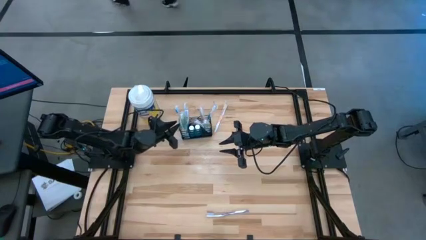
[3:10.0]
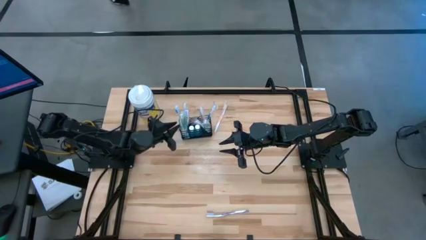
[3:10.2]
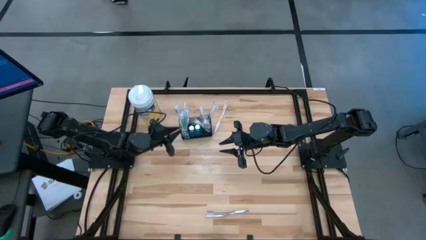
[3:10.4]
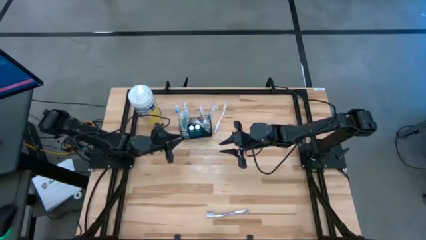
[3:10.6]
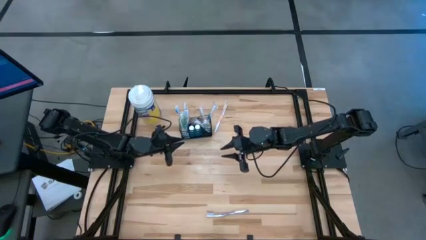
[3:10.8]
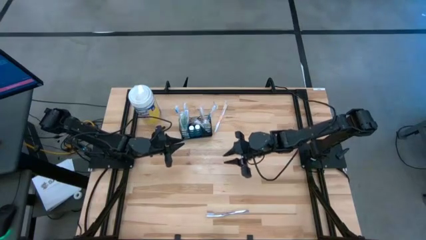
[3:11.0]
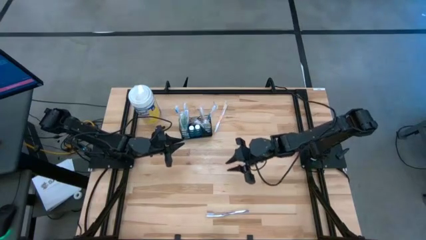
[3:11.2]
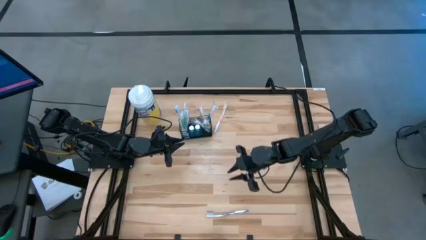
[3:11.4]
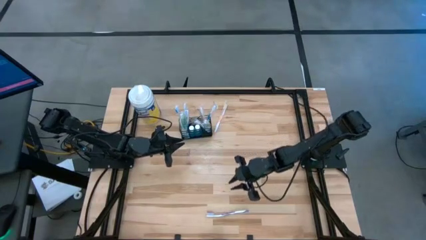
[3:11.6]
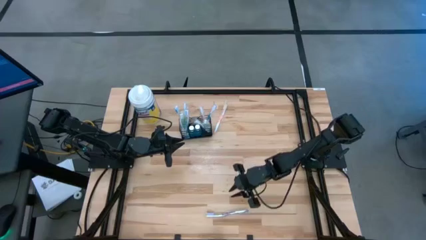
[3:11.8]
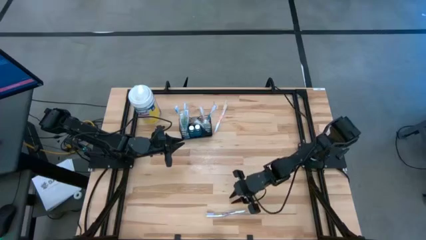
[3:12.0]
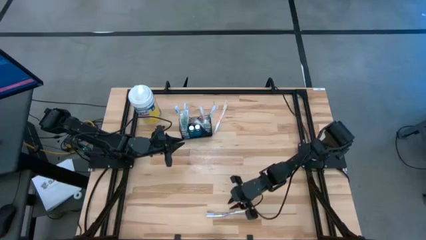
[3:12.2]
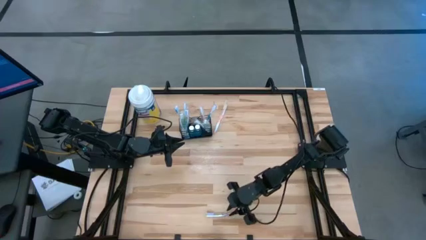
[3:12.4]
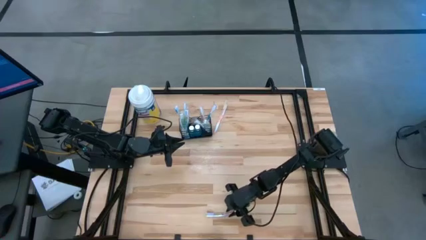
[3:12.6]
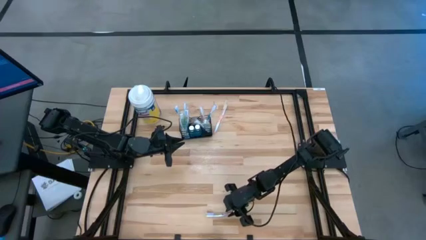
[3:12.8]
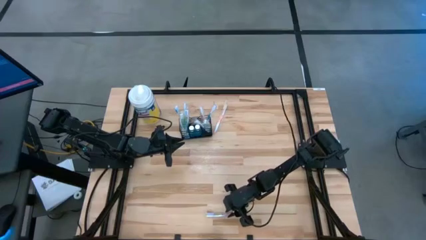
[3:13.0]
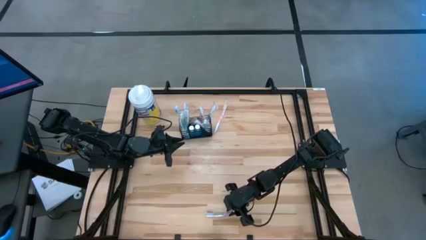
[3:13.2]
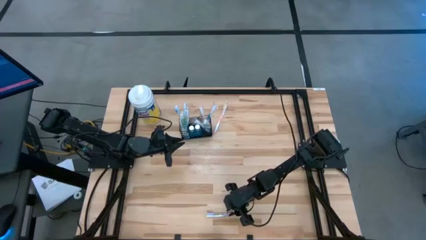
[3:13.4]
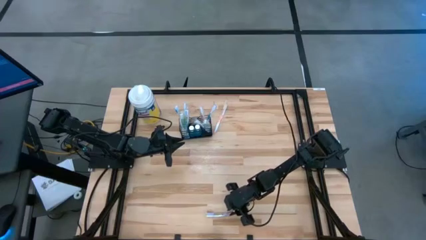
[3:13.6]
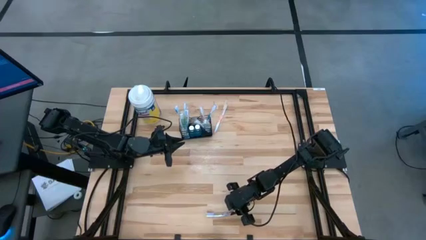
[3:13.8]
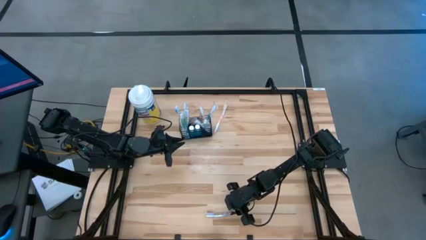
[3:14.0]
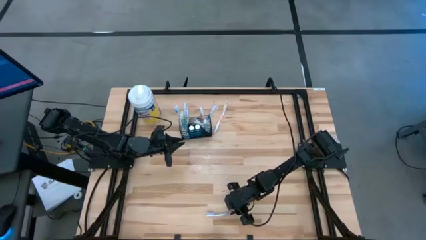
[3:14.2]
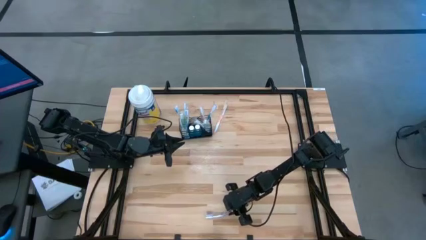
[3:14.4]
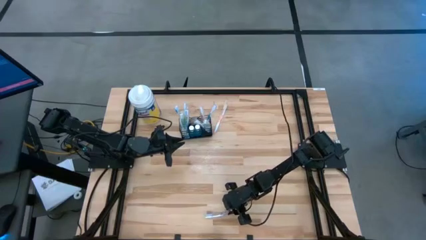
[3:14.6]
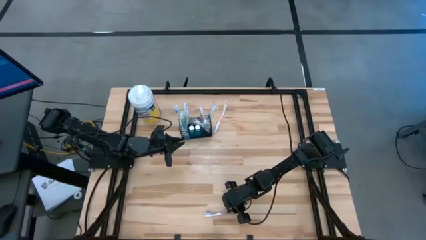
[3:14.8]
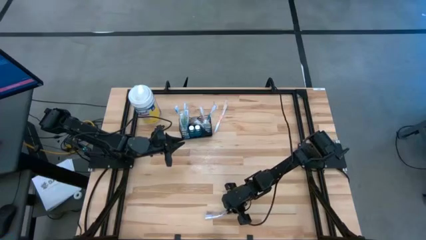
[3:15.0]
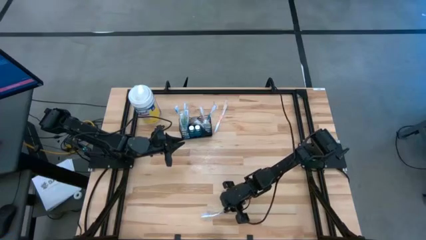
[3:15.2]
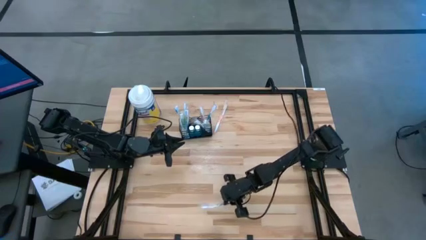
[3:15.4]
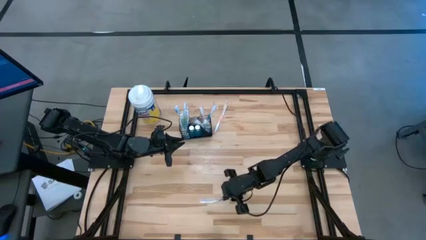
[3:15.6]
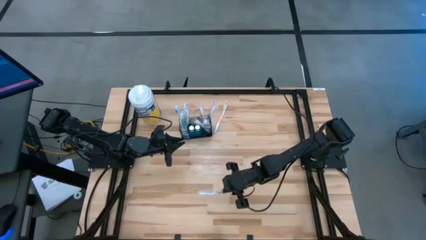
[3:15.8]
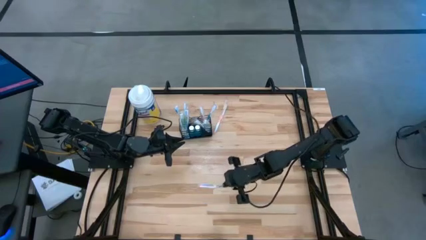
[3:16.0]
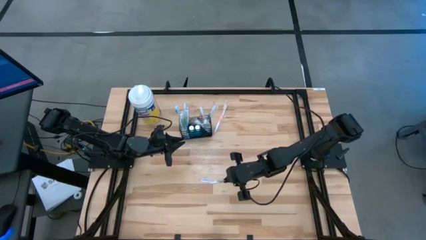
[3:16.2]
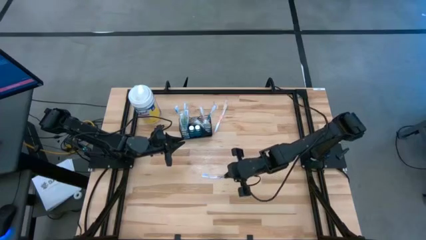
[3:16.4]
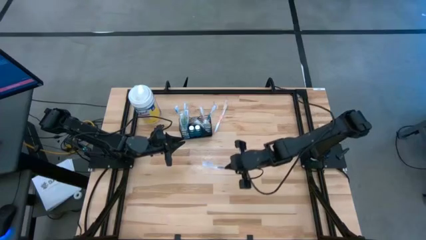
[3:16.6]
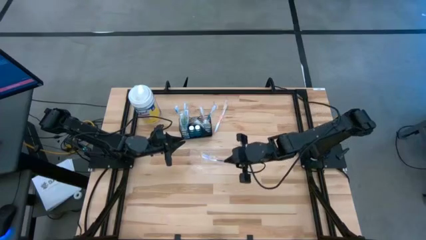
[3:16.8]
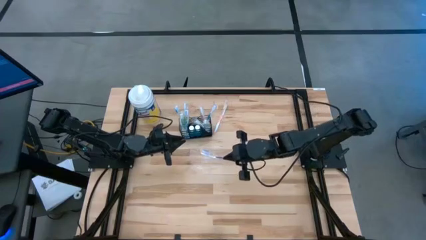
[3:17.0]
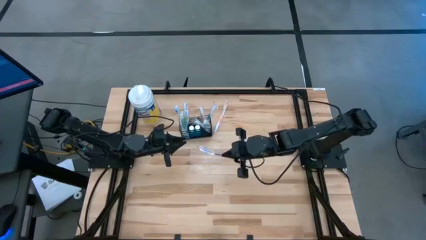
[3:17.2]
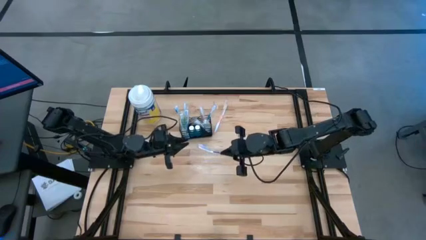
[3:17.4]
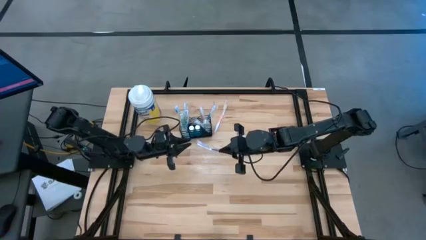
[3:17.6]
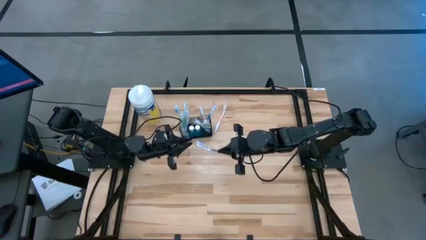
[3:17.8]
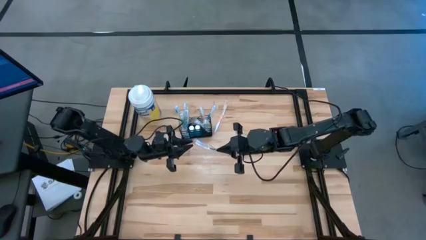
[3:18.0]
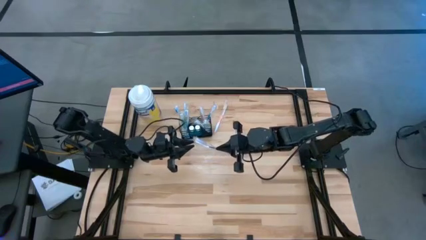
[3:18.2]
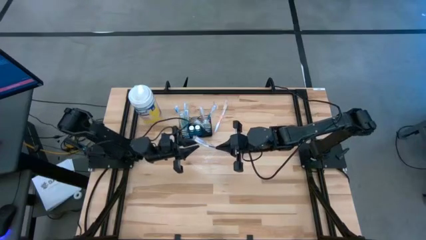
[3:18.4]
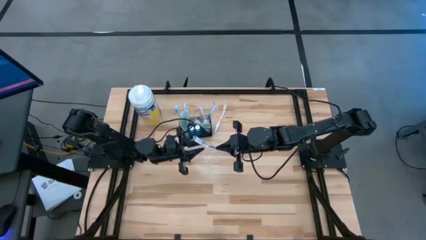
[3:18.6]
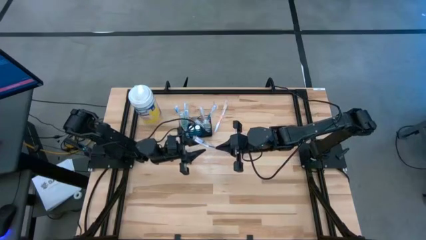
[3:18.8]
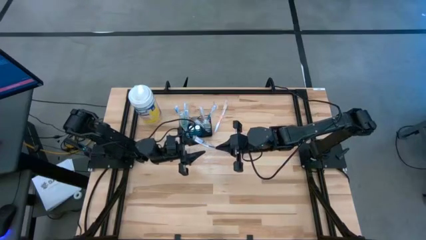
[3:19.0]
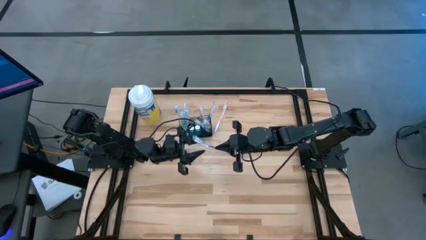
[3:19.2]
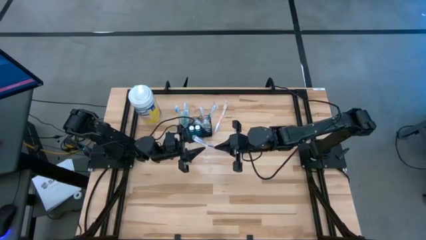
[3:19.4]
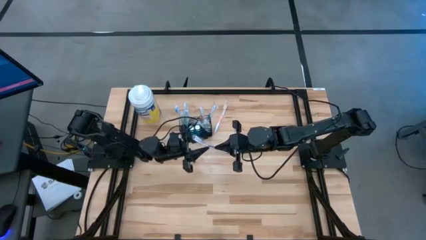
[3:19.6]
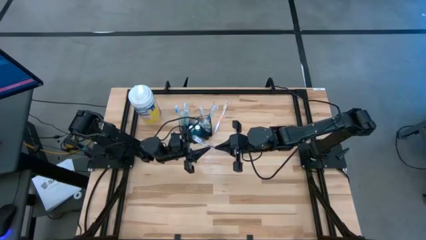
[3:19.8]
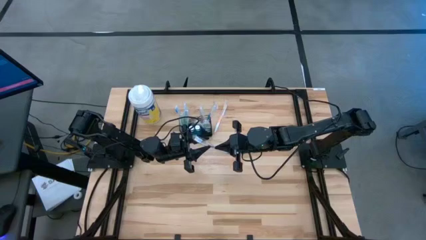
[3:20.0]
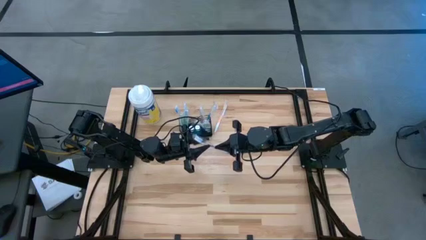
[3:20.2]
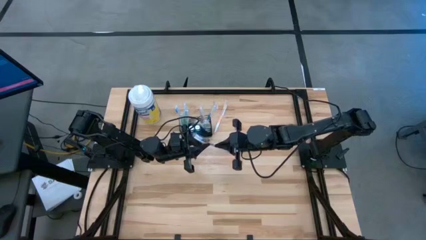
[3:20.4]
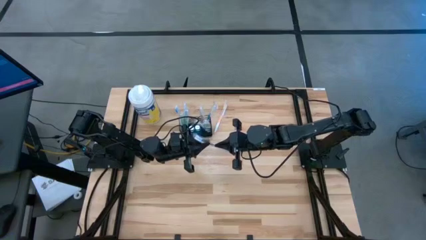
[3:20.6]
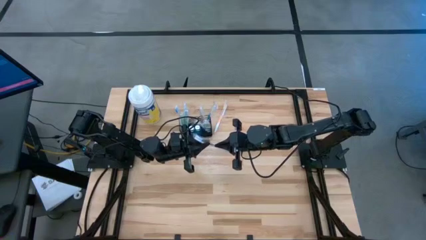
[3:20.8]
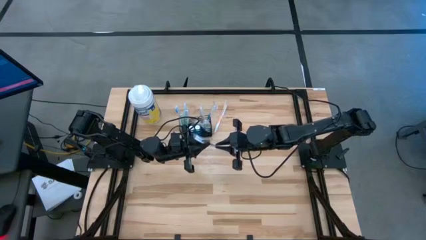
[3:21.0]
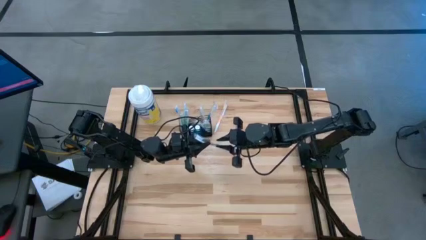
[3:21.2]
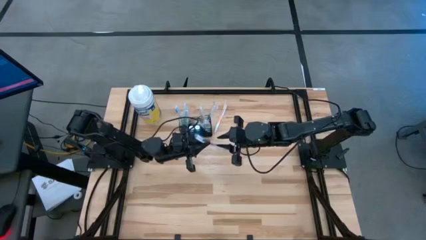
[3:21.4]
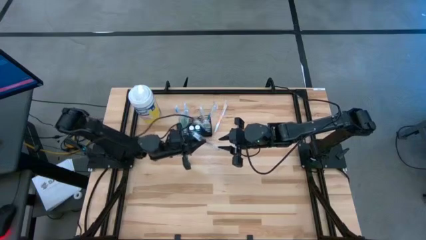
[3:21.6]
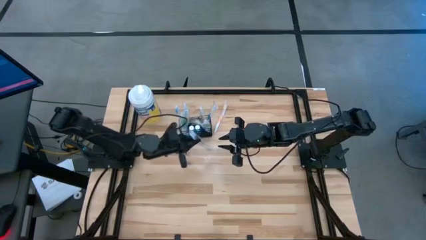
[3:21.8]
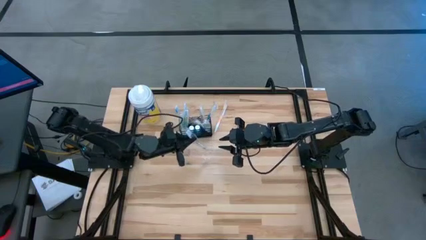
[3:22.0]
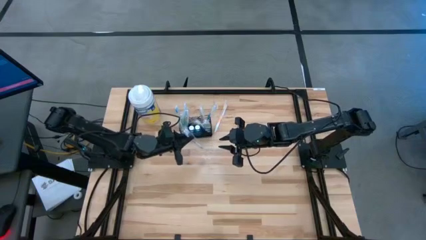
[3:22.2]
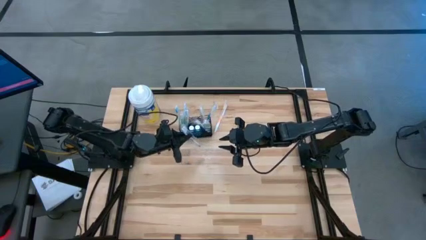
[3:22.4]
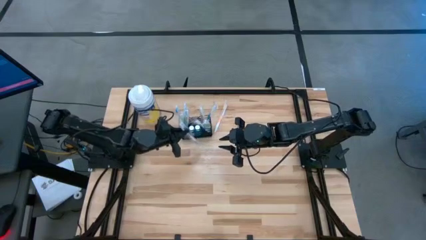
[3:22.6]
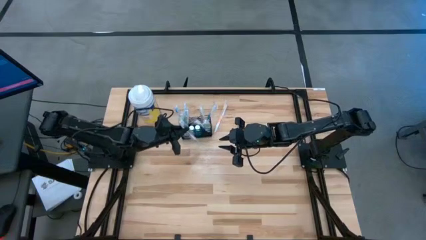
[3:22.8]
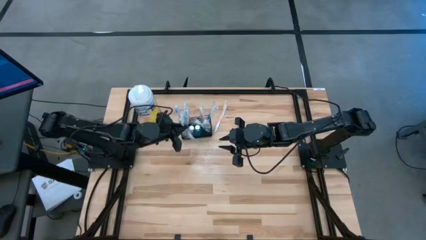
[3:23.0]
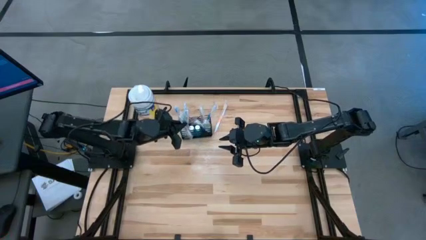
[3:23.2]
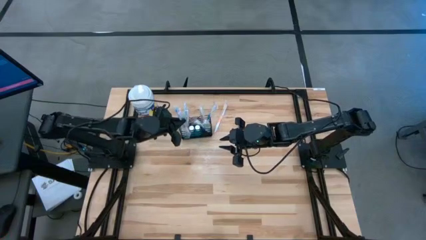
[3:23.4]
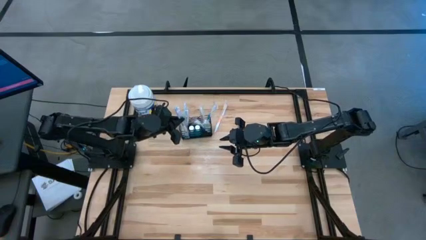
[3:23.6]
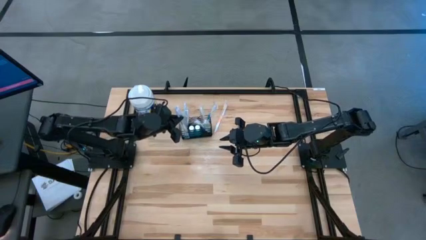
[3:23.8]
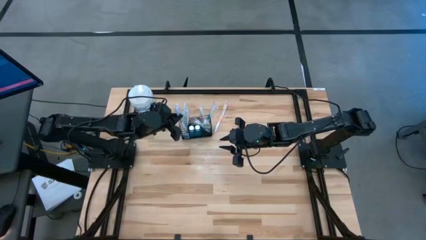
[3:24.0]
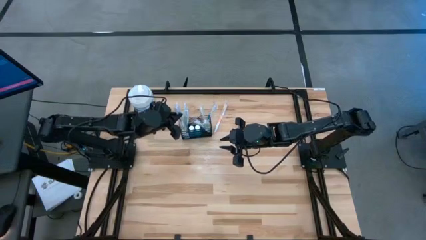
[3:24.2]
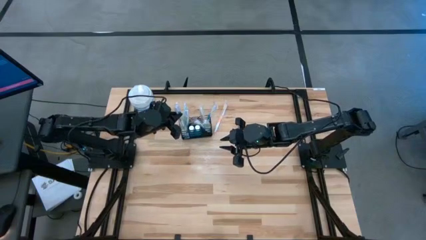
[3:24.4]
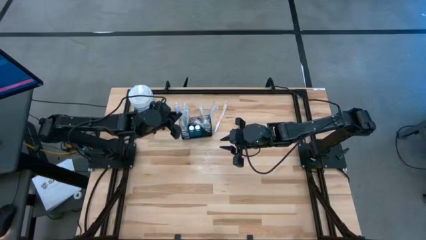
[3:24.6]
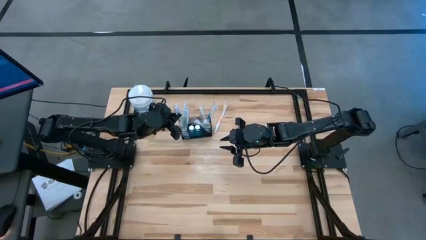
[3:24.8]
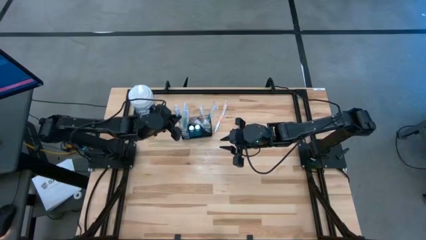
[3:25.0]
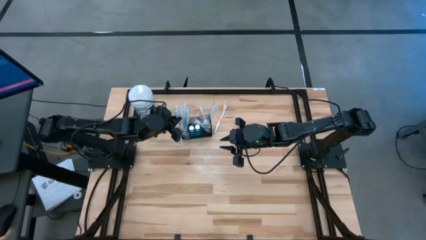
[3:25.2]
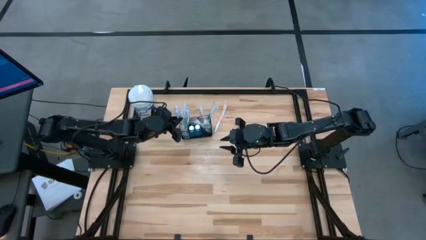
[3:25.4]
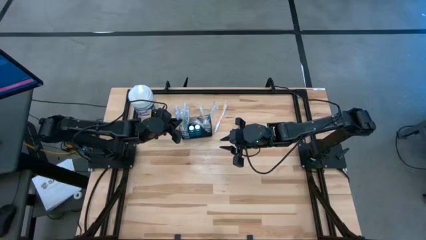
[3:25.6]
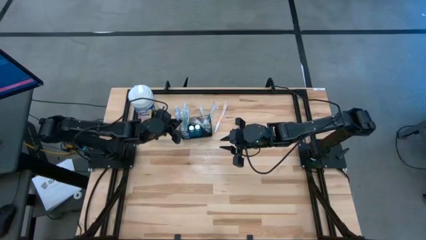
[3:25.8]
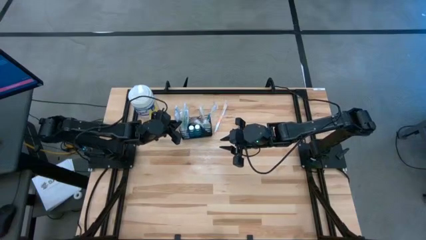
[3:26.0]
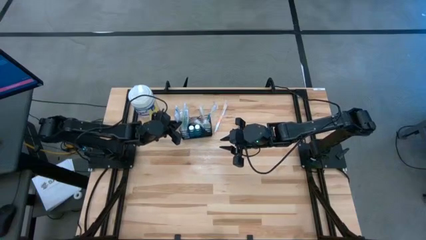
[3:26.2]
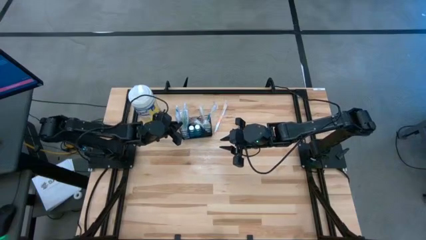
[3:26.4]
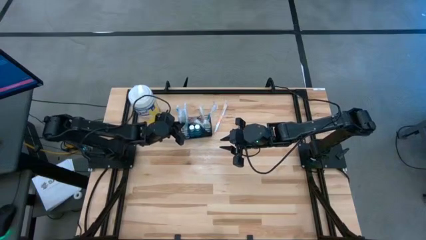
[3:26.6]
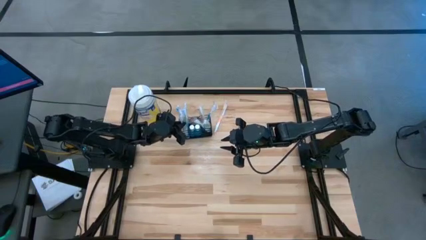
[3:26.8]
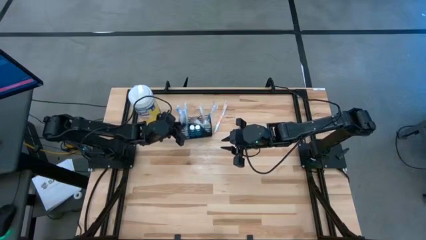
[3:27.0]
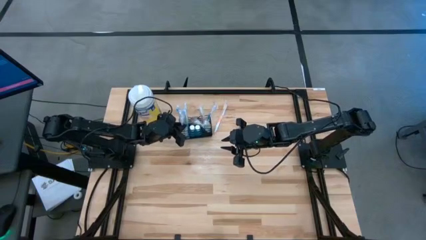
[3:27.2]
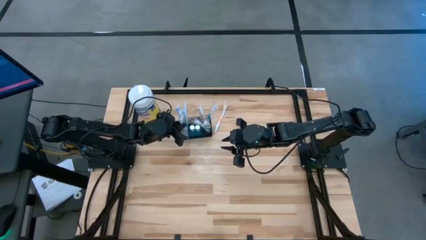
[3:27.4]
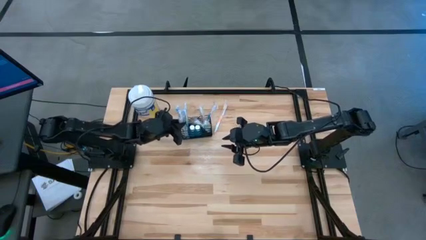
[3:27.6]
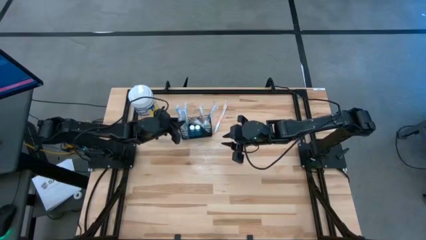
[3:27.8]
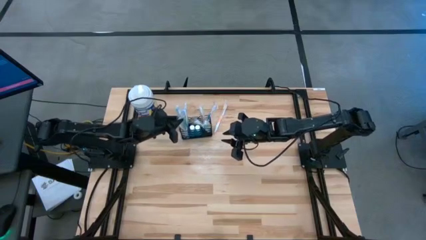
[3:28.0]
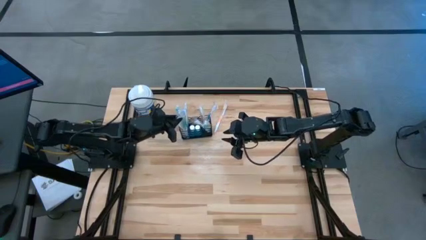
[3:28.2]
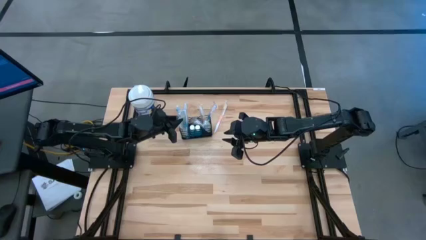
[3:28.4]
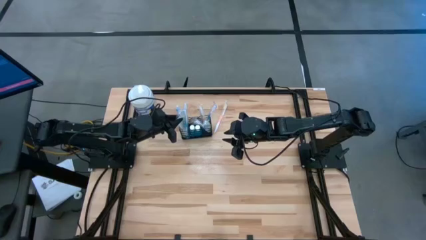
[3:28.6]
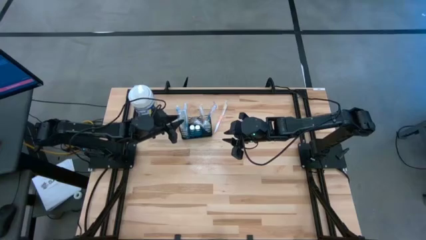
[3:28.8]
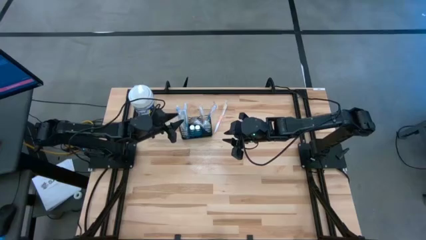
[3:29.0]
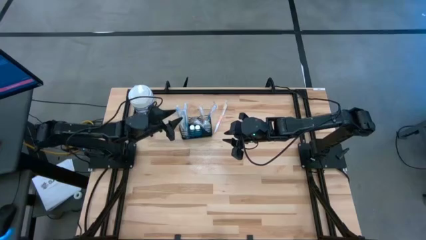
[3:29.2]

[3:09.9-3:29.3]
Task: Pick & Place toothbrushing station
Put the purple toothbrush into the mesh organizer
